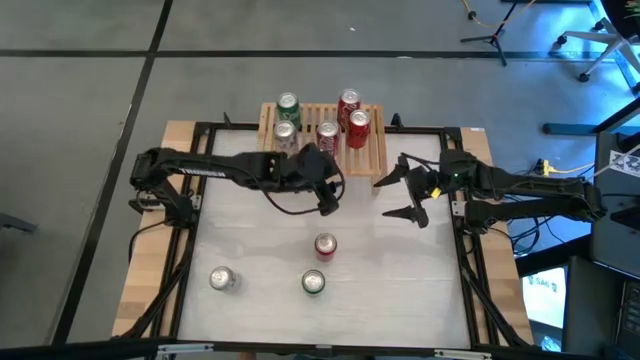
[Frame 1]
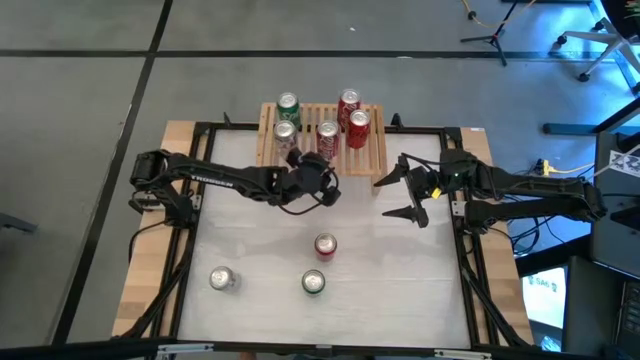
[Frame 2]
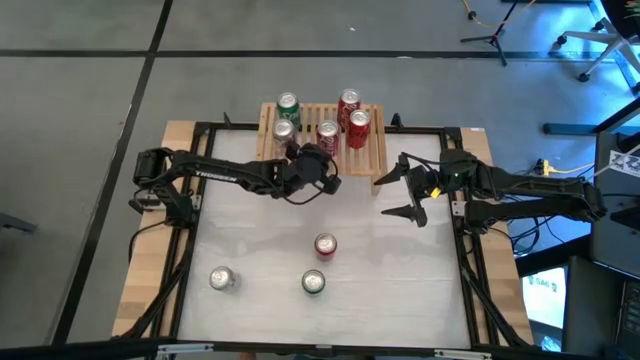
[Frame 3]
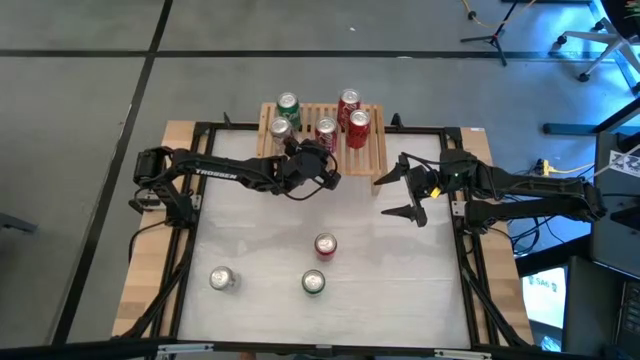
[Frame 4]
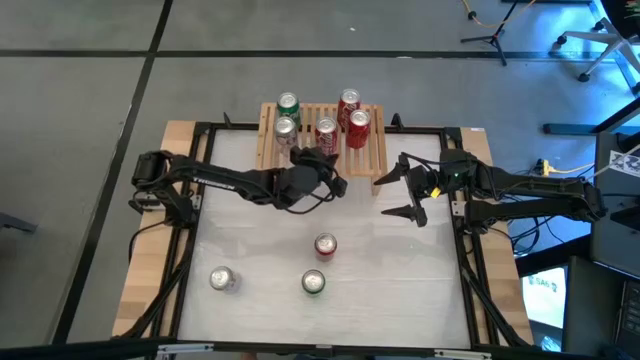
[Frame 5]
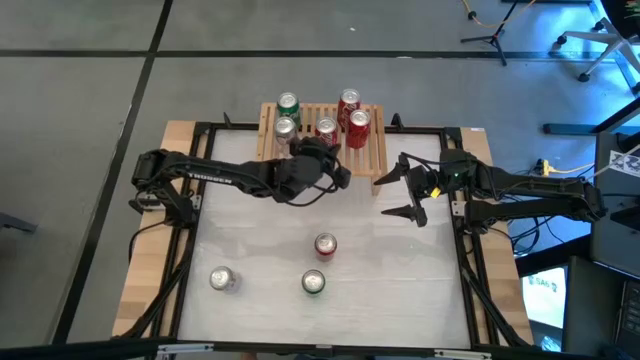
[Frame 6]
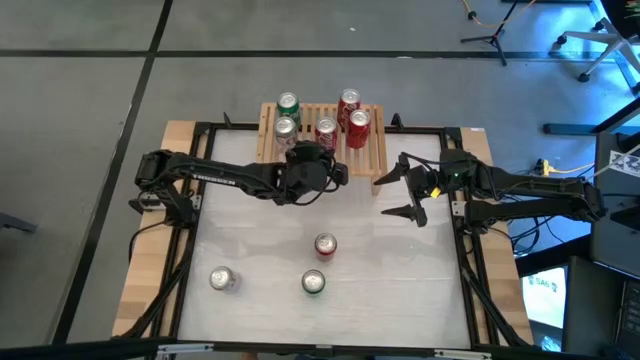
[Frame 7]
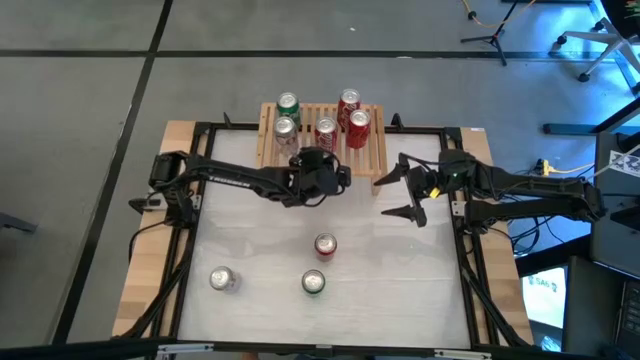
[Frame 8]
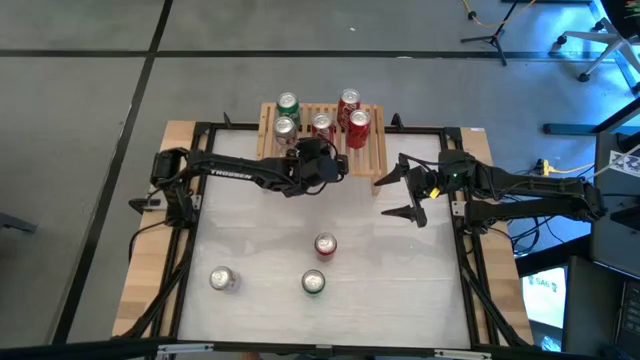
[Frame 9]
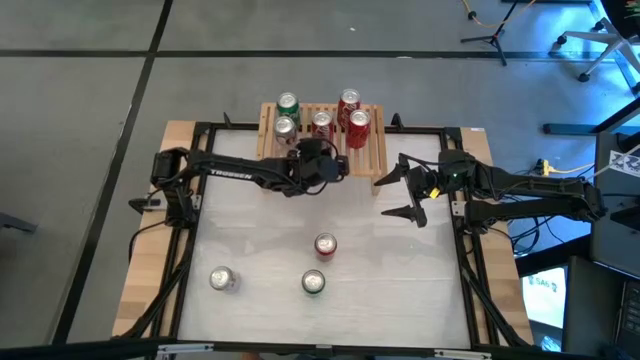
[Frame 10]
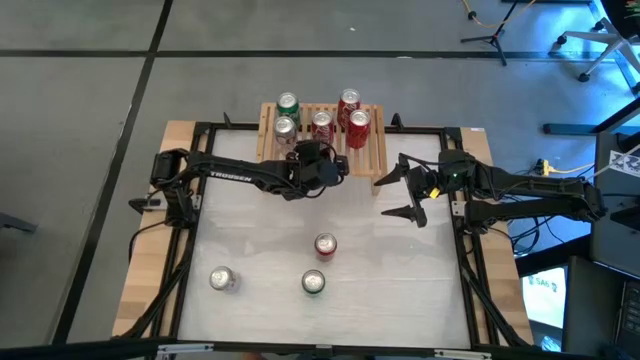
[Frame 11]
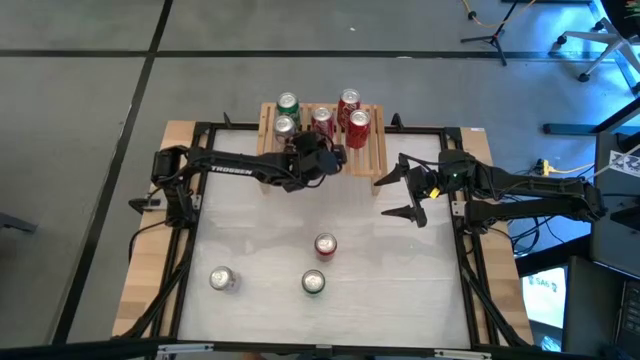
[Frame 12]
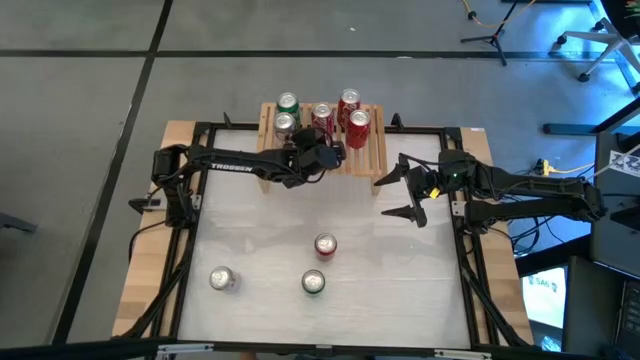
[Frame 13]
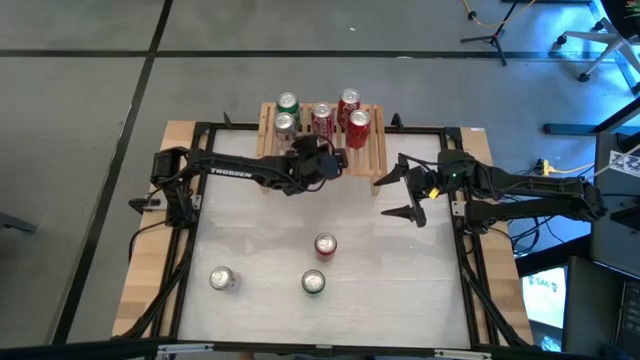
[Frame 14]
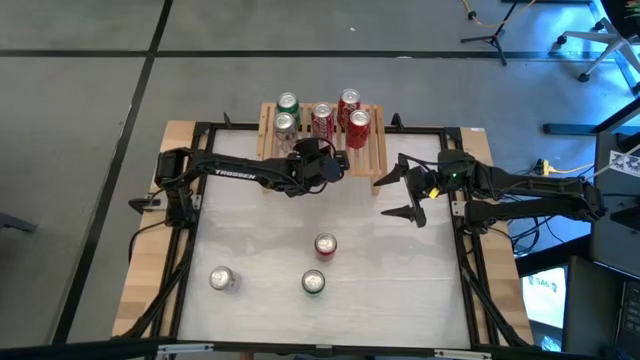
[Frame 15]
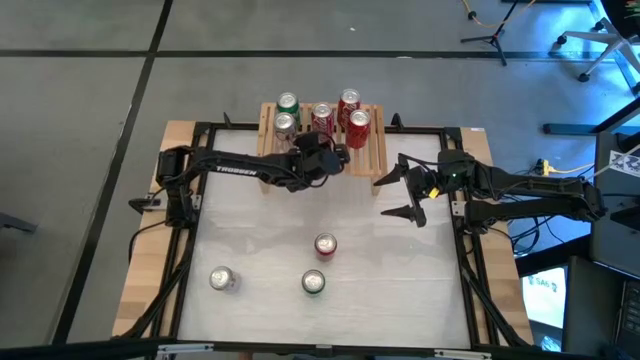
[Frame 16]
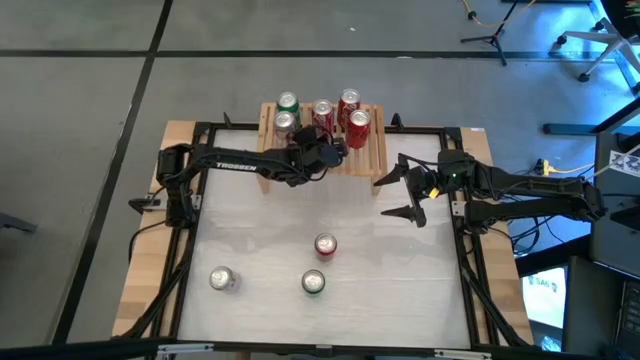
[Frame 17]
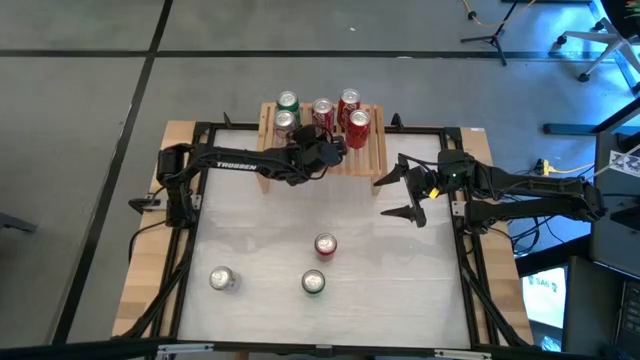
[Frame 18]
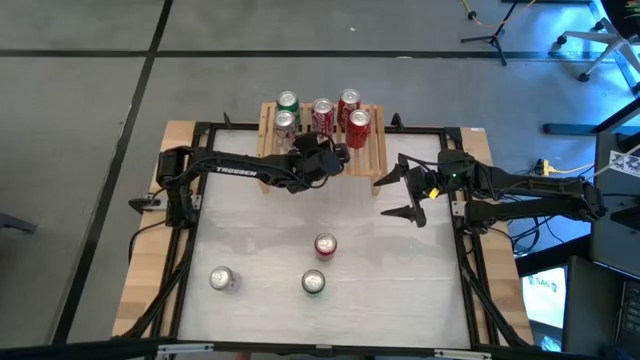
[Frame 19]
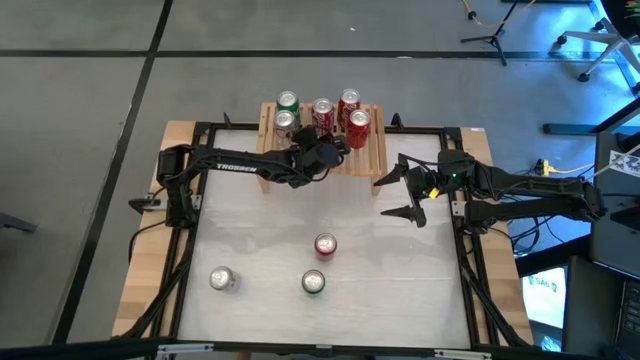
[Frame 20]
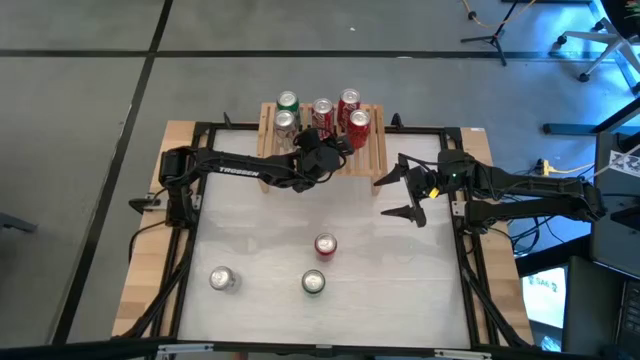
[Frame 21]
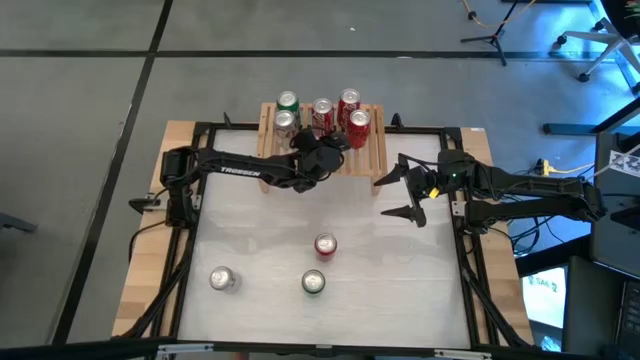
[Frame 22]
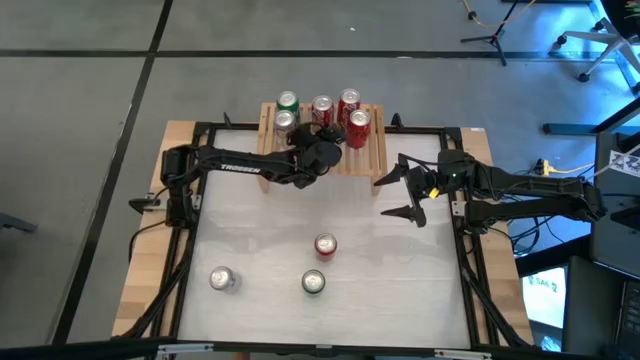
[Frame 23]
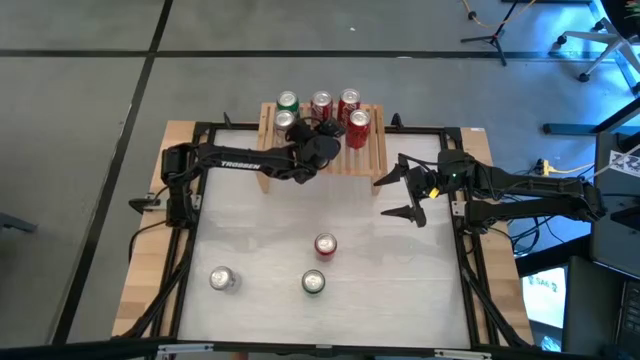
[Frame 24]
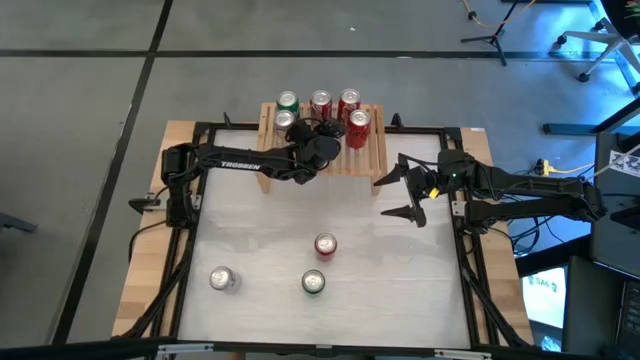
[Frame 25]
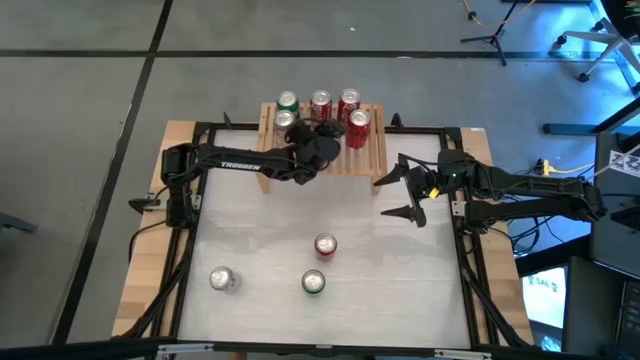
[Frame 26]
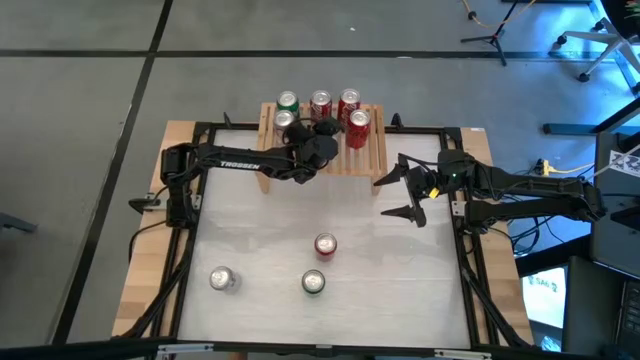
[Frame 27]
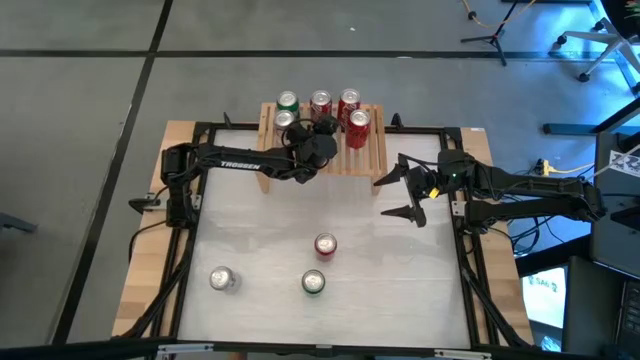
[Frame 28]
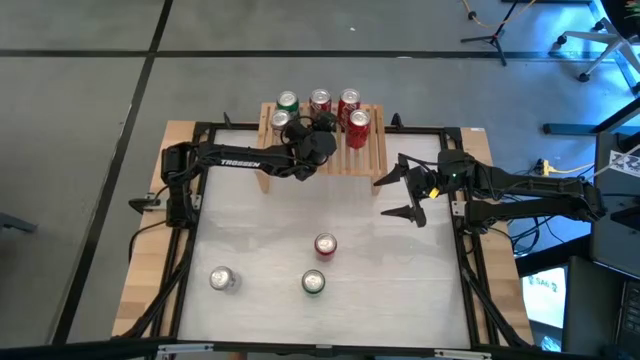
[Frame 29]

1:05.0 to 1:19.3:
Task: Place canned beverage on shelf
Put the red/white soda can on the shelf

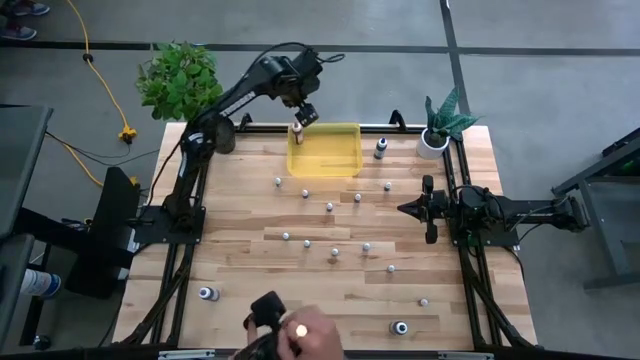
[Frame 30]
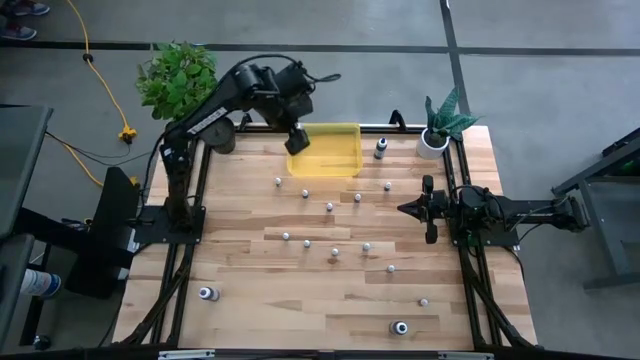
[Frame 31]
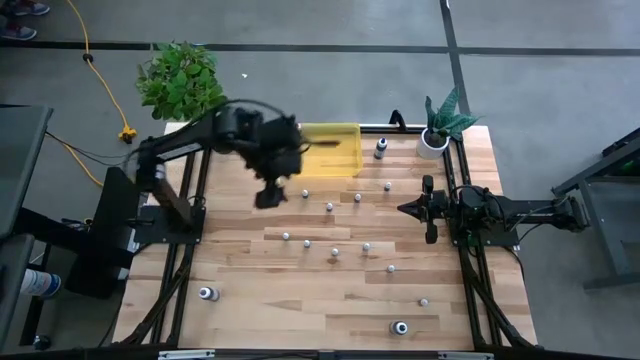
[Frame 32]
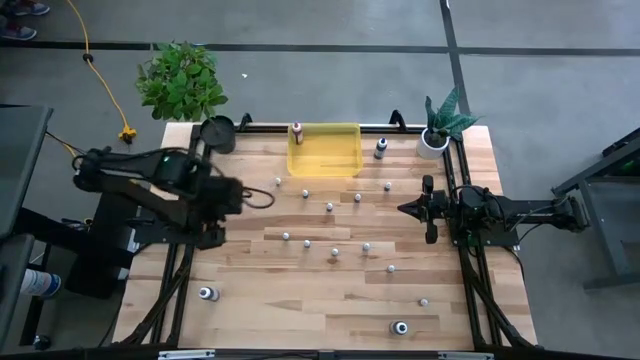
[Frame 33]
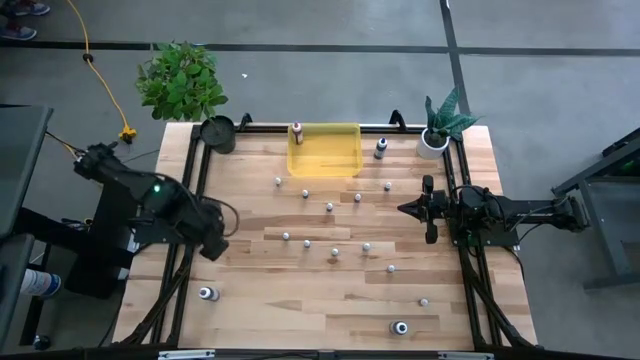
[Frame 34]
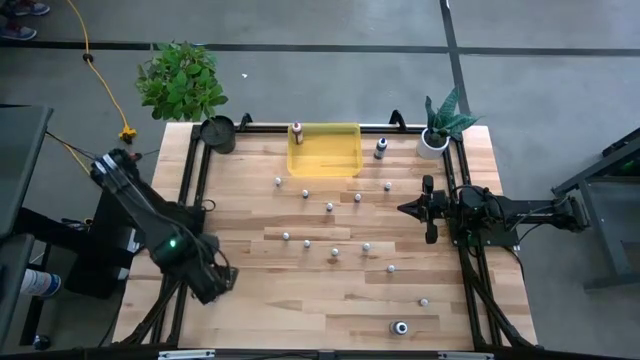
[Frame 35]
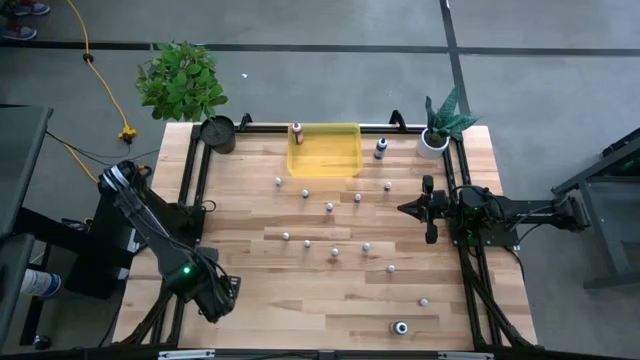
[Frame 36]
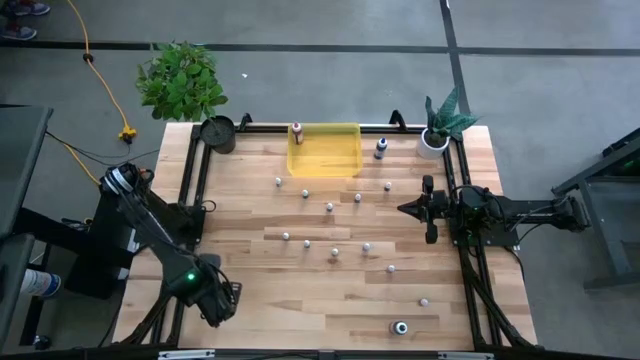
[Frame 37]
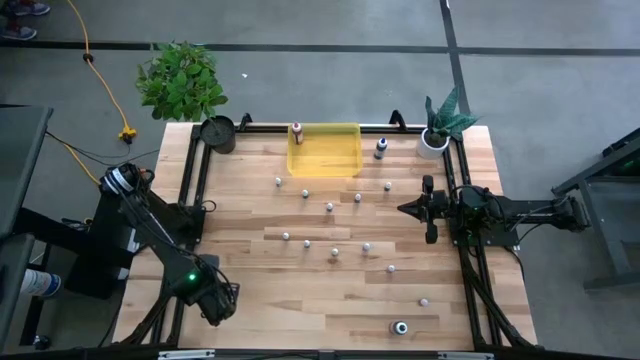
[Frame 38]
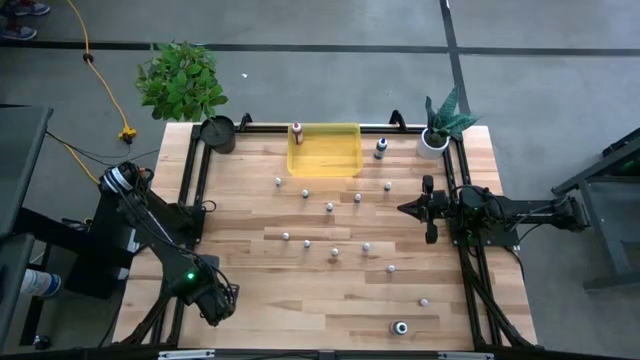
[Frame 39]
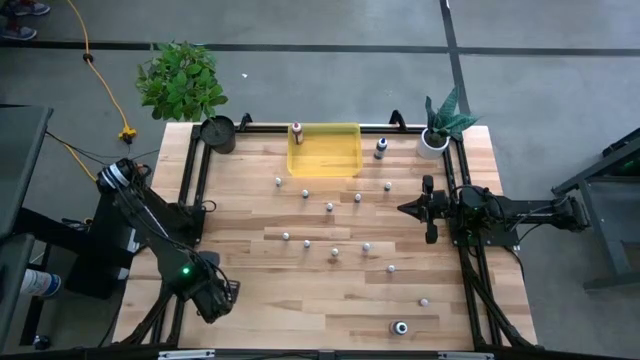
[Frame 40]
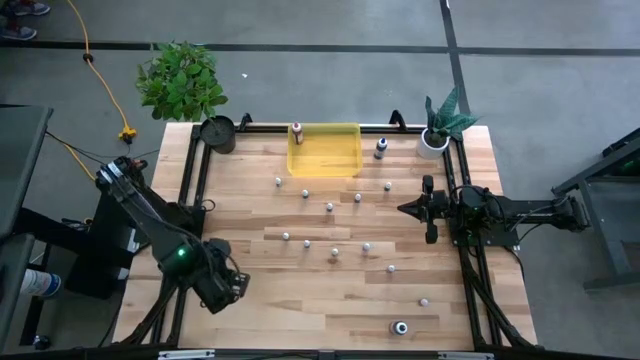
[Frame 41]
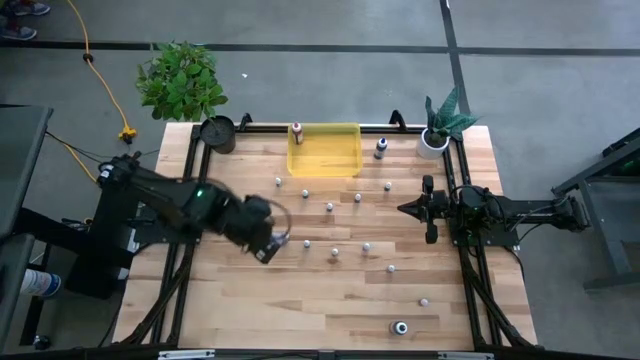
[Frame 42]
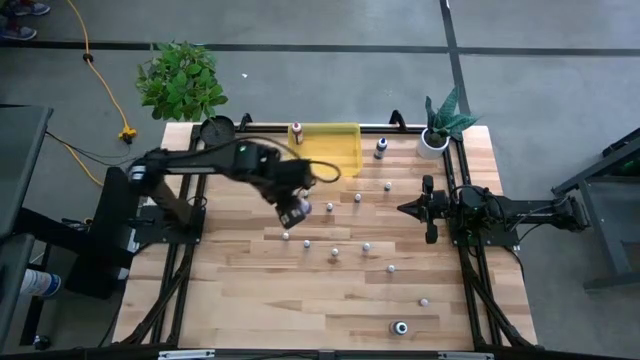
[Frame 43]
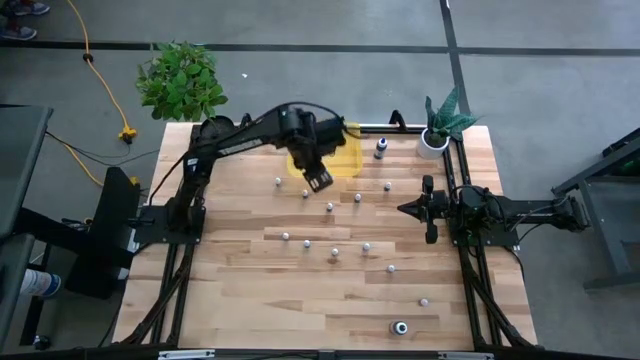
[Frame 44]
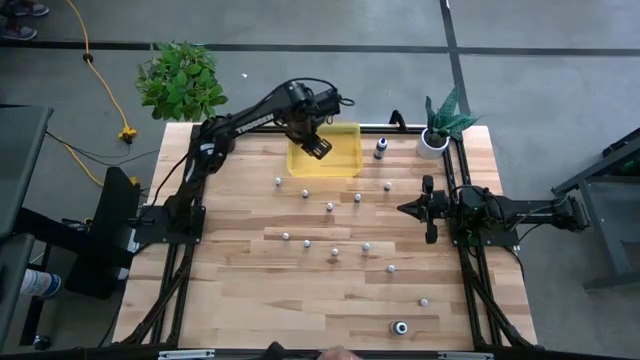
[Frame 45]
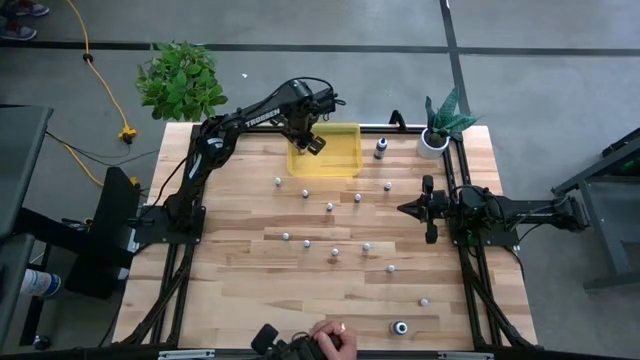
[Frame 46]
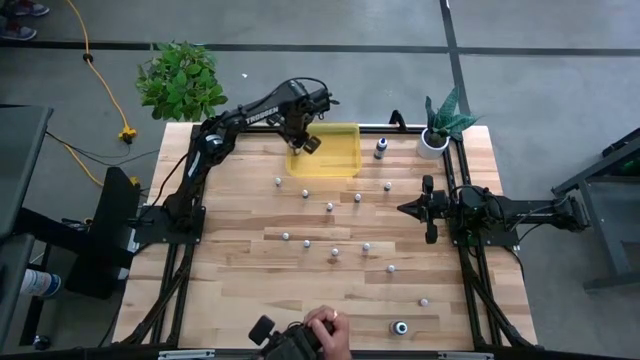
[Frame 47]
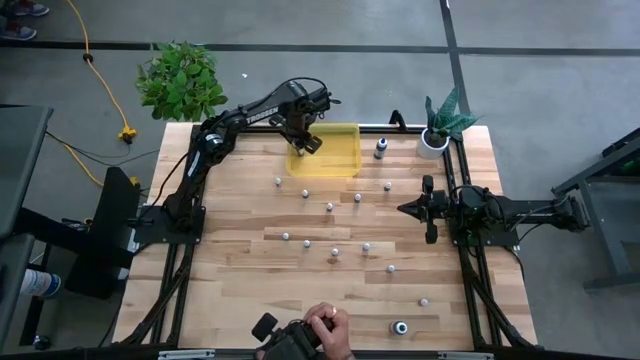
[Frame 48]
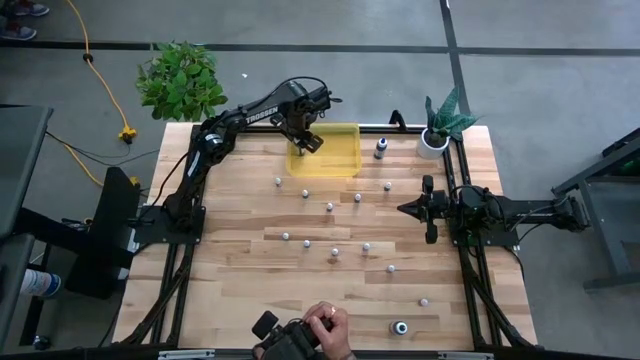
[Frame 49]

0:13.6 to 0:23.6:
Task: Pick & Place food coloring
Put the big violet food coloring bottle into the yellow container
